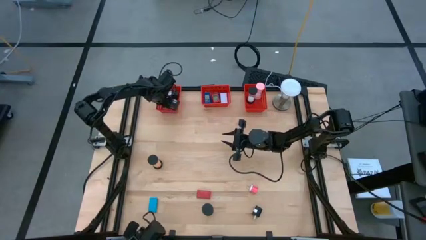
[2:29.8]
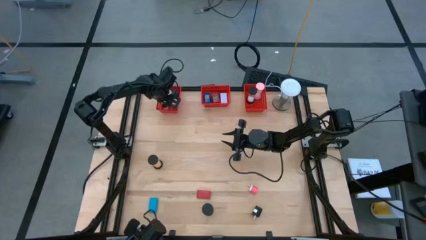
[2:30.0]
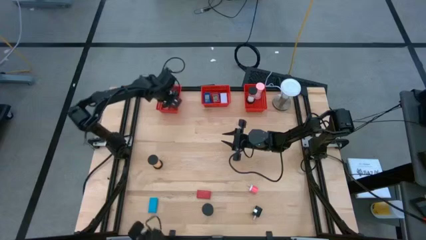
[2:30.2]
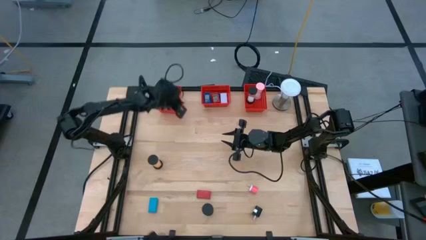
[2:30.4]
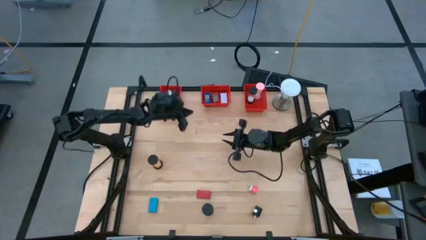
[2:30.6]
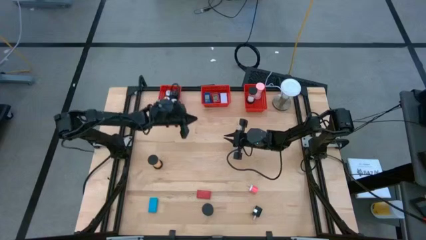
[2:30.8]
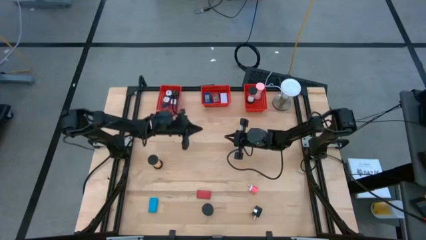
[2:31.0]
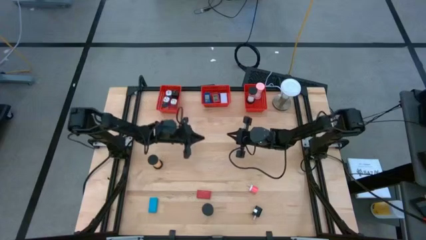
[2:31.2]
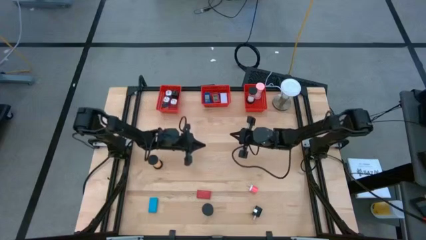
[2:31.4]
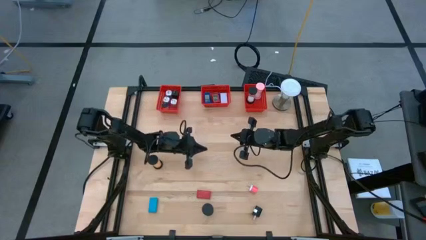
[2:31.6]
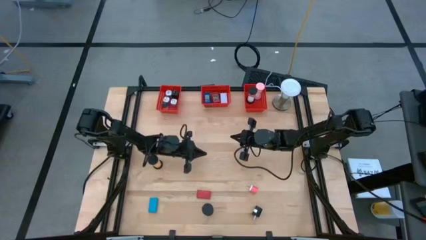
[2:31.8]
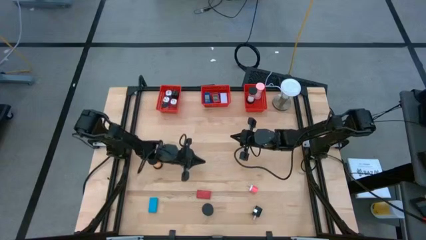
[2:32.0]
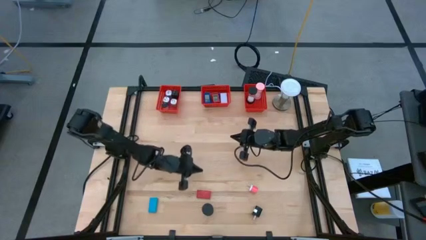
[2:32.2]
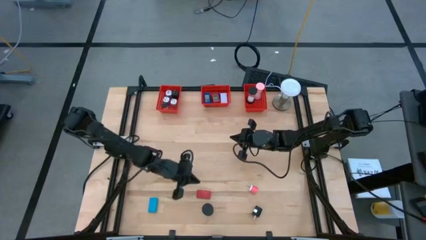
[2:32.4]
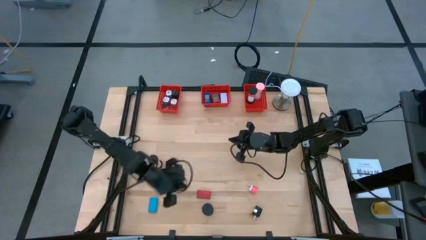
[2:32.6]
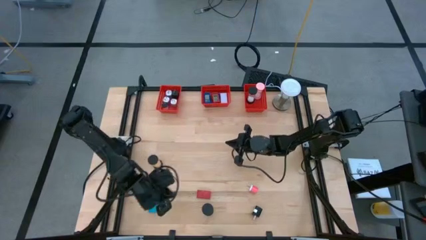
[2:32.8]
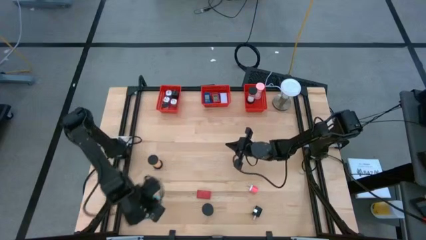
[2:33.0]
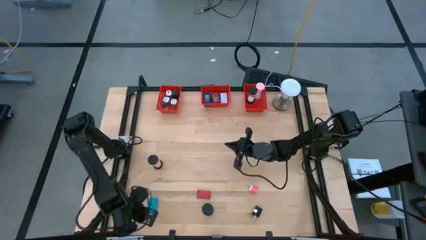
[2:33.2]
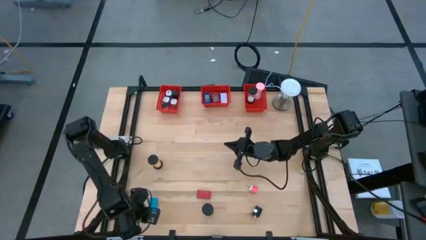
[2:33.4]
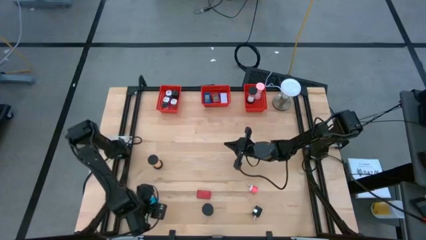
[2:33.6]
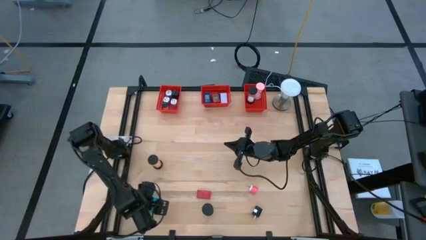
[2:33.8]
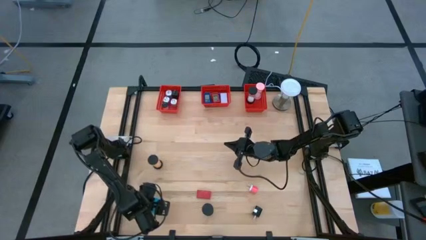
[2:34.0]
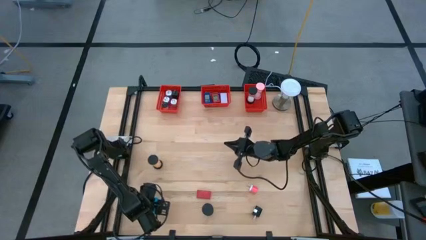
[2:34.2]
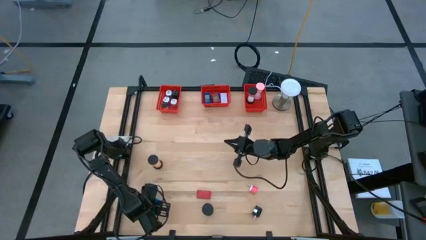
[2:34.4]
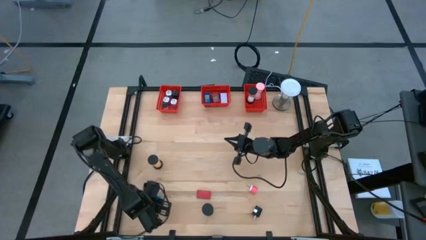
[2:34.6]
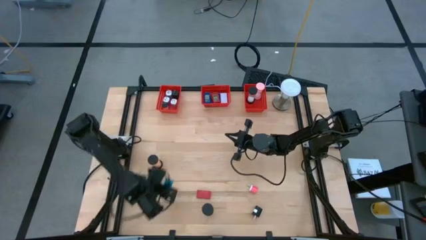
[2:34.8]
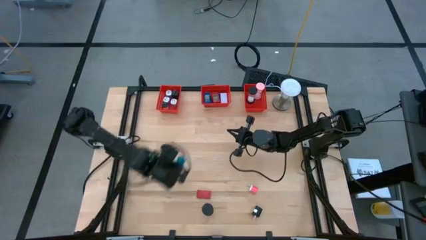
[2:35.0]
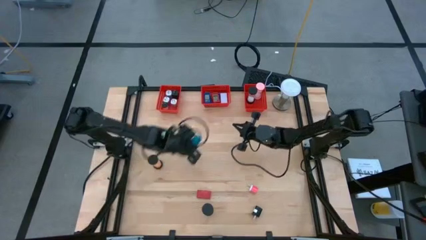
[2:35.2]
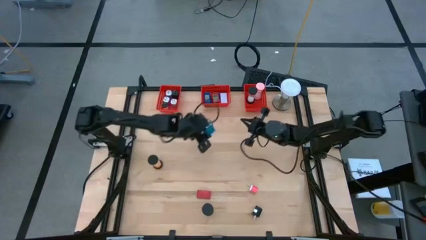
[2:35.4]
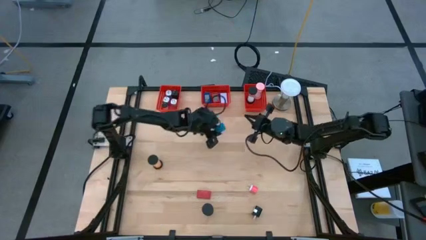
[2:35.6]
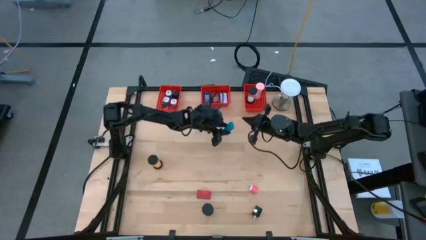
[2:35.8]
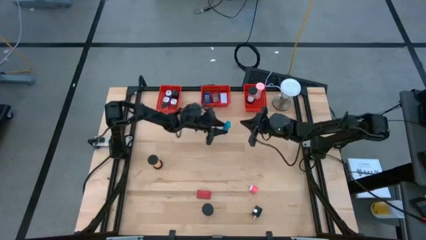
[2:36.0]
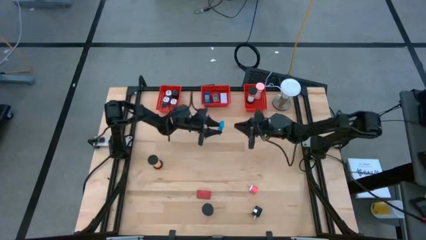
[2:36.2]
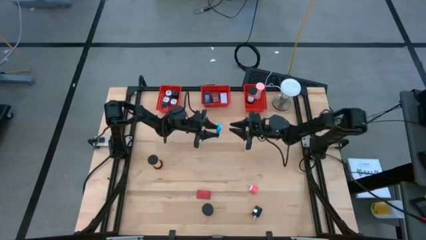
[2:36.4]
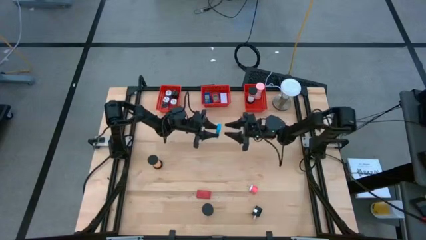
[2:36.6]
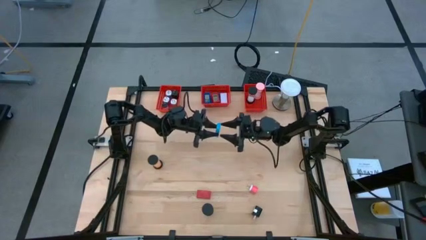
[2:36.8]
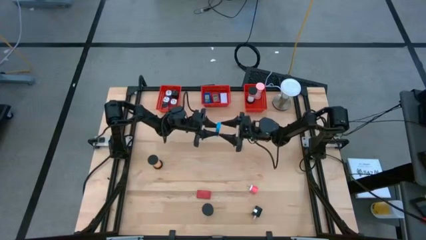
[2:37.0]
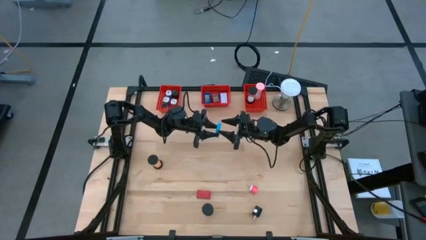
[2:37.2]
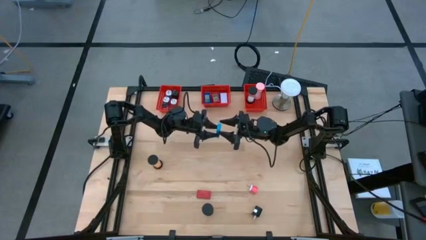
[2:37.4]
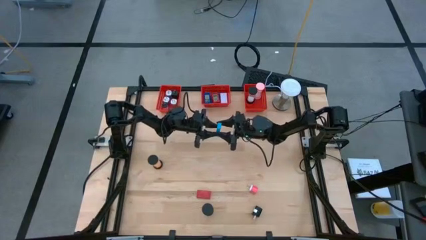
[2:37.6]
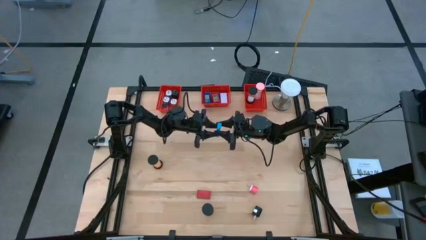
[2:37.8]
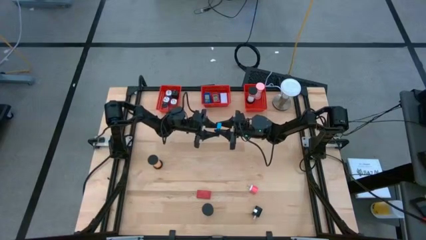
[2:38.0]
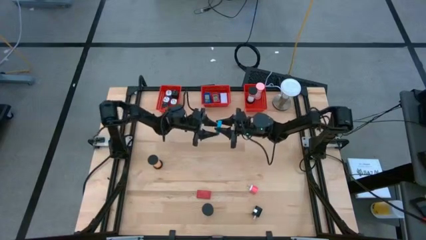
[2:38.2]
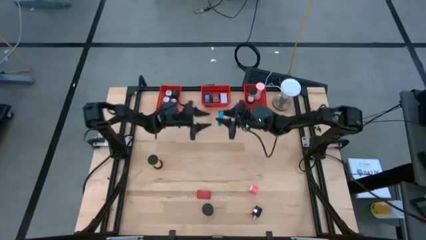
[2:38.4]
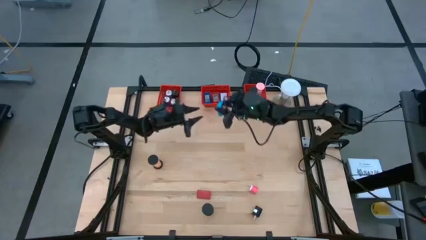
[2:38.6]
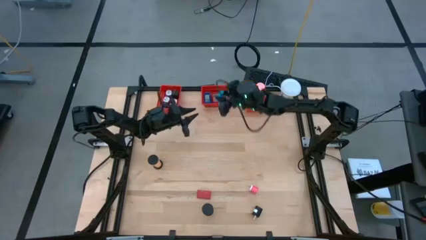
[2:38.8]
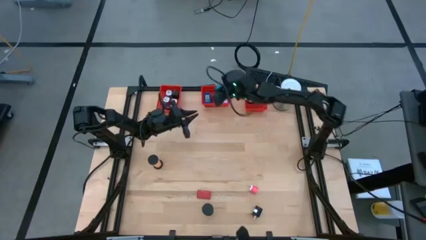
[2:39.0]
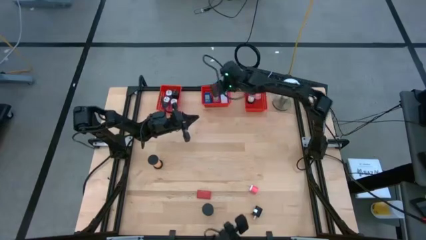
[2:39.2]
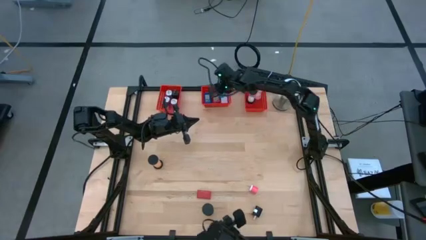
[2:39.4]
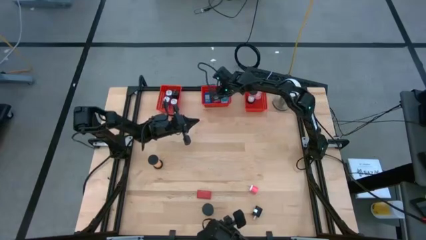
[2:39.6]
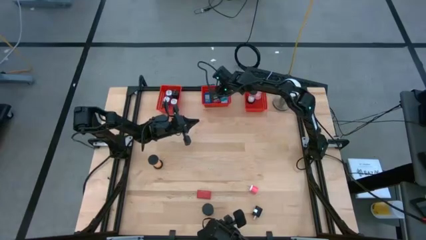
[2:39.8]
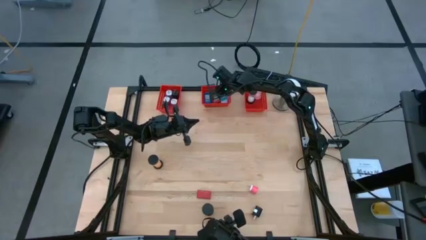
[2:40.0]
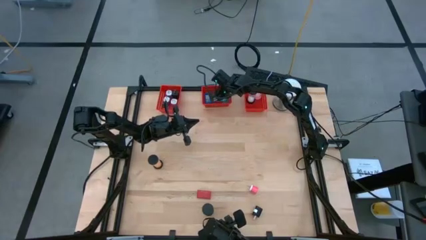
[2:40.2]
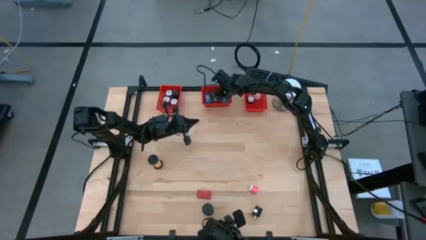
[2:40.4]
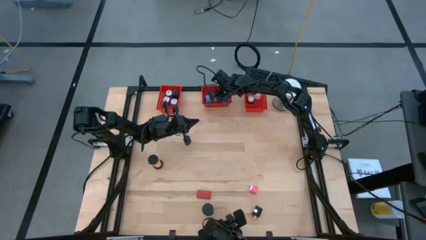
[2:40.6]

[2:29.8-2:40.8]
Task: Pick & Place Office items
Put the light blue digital clock into the middle red bin
